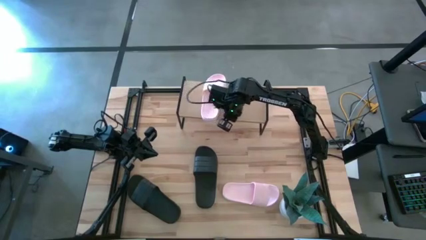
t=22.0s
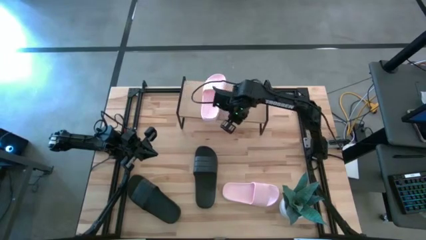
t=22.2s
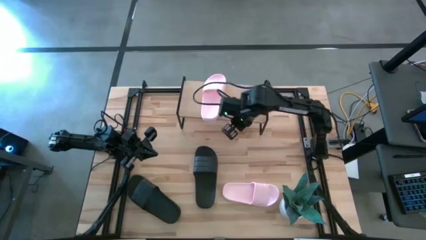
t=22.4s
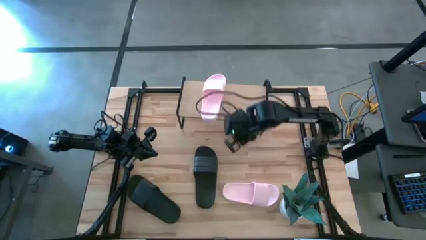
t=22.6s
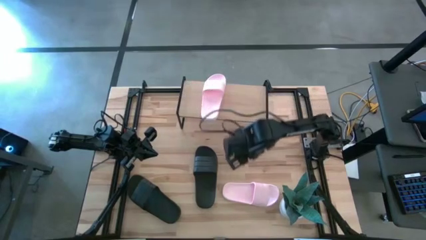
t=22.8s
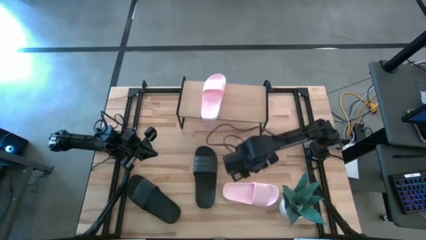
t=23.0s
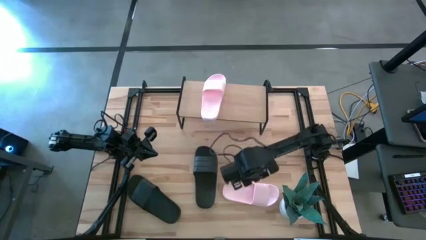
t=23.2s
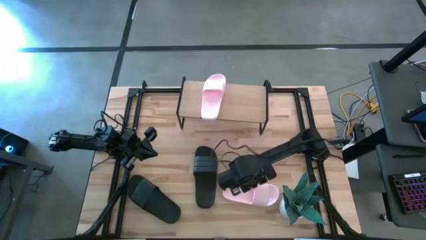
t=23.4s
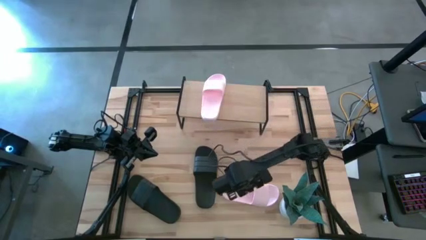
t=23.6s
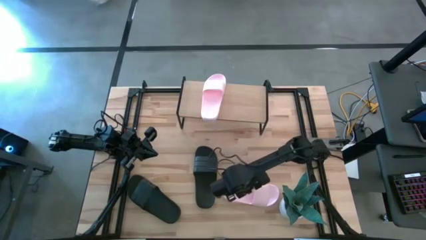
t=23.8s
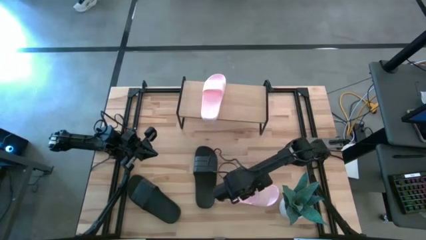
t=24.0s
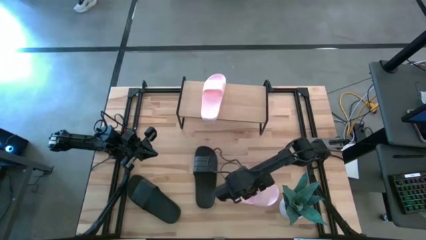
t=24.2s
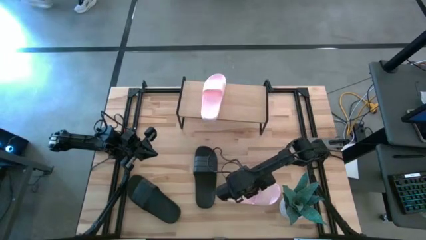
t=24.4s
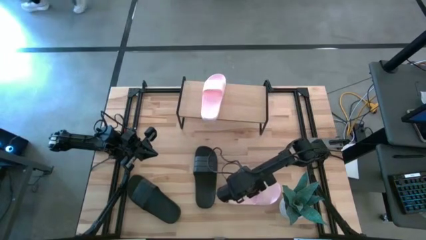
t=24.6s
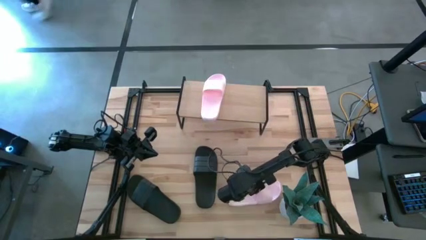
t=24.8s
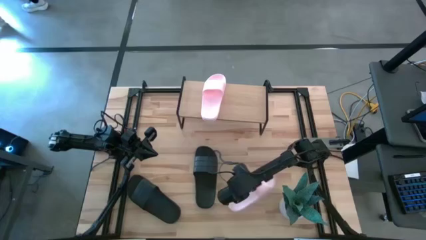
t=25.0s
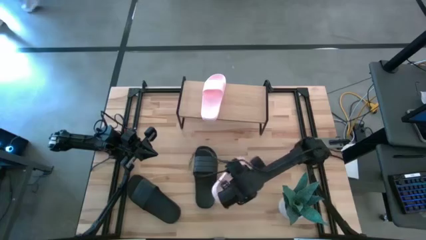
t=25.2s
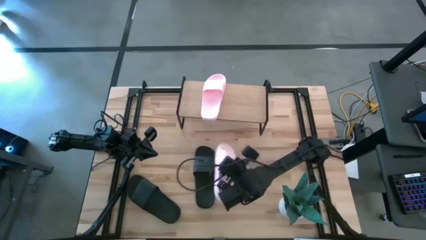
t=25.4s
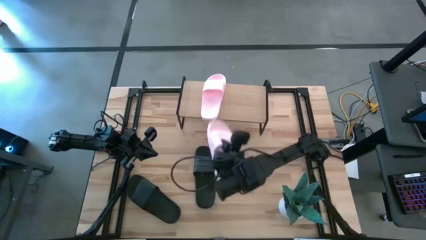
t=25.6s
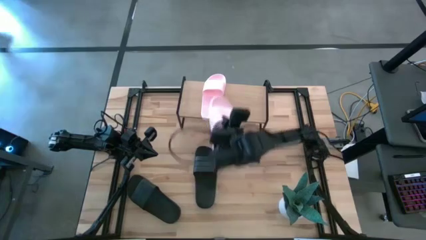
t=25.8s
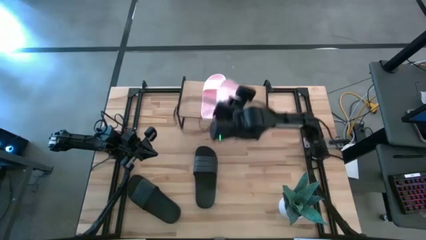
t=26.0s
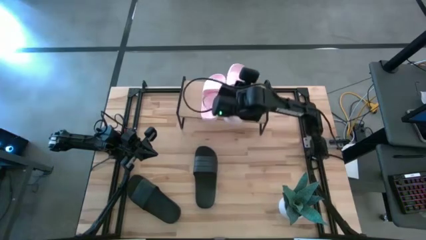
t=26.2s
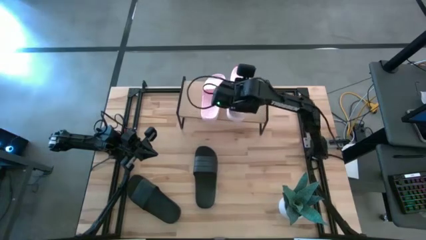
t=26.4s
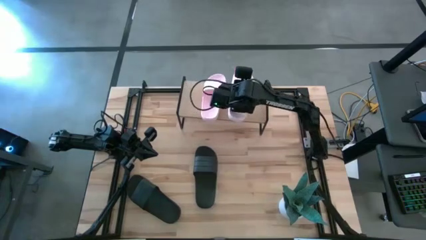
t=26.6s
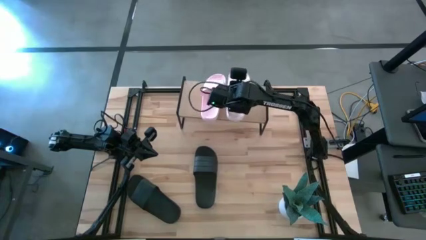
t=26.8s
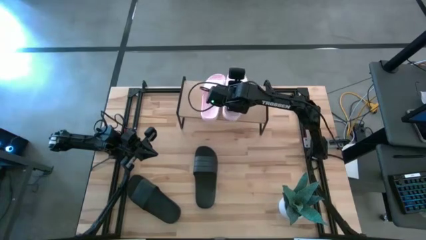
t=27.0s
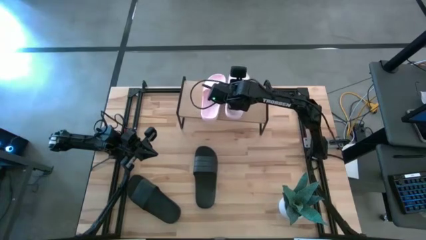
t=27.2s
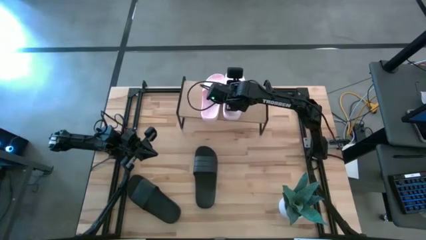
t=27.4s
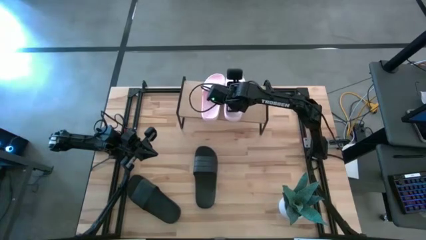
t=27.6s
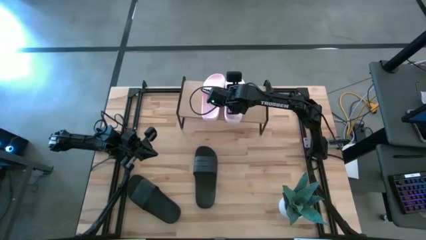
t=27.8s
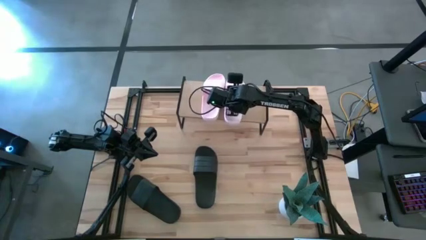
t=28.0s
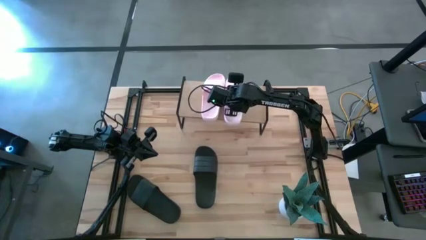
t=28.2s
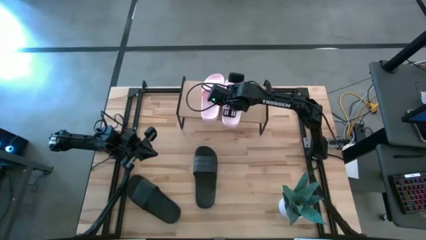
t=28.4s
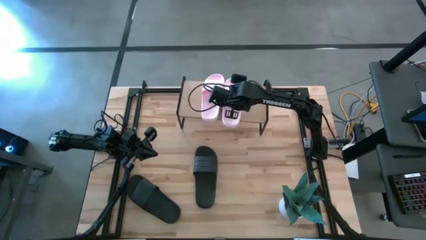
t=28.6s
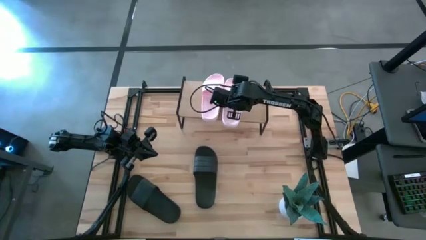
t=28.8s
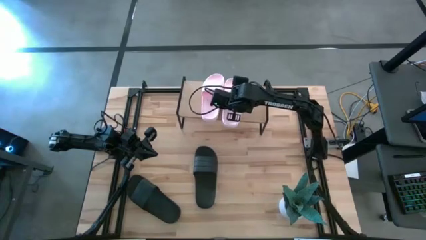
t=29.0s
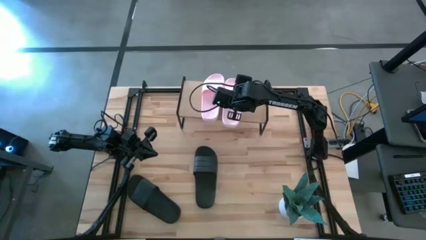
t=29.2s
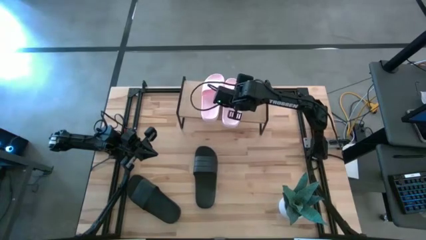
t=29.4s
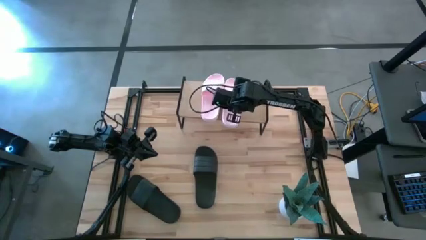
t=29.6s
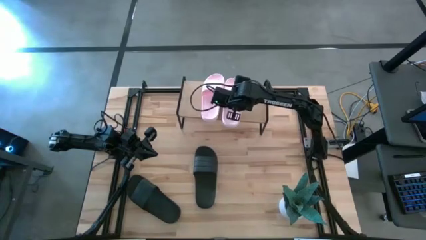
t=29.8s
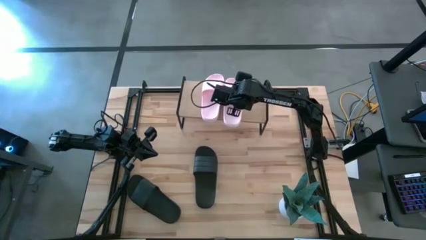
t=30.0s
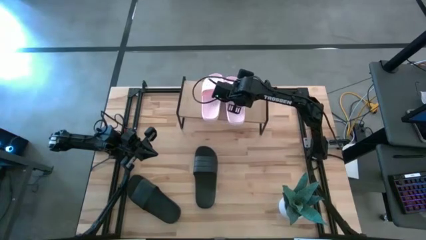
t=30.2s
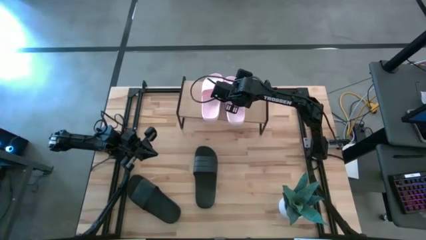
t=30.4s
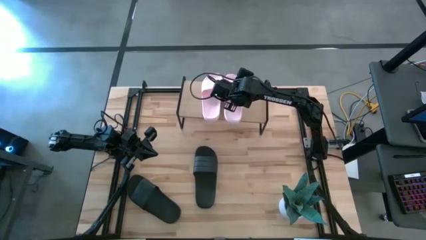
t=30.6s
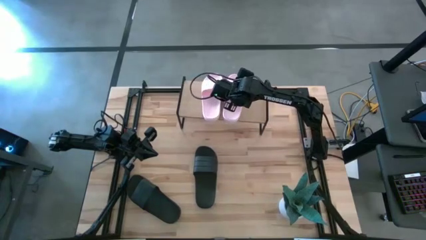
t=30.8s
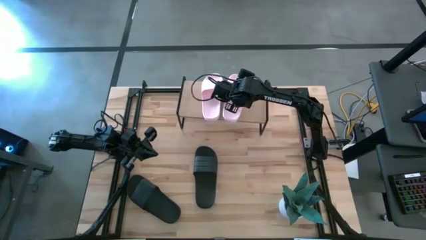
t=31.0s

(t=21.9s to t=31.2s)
Task: Pick and place slides into the shelf
Put the pink slide on the shelf

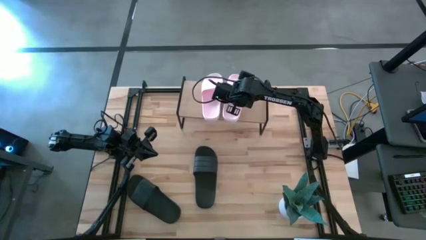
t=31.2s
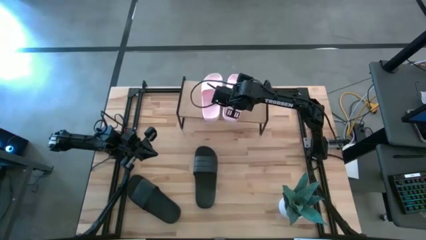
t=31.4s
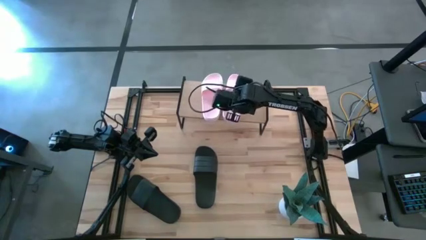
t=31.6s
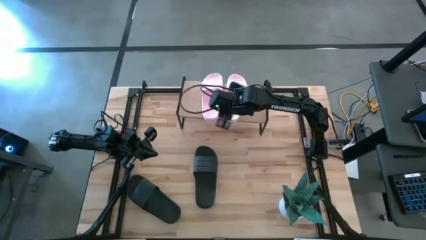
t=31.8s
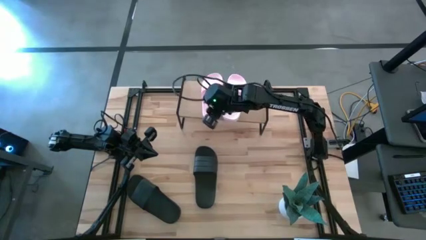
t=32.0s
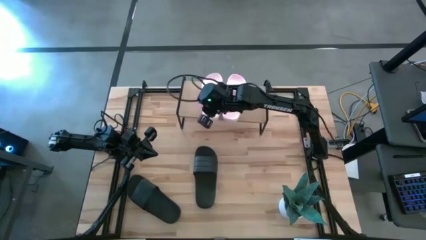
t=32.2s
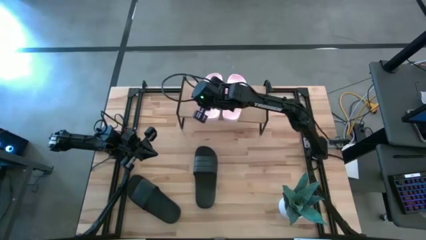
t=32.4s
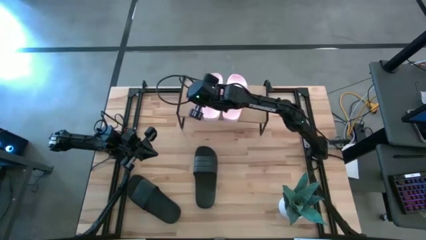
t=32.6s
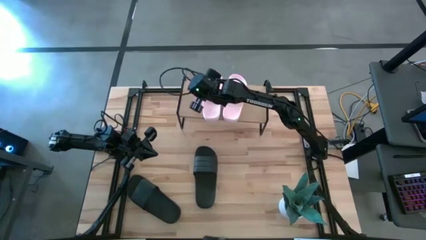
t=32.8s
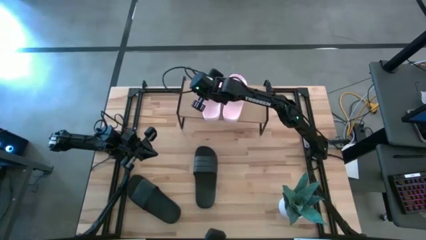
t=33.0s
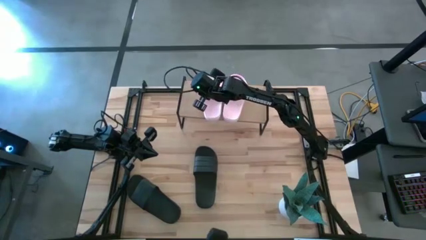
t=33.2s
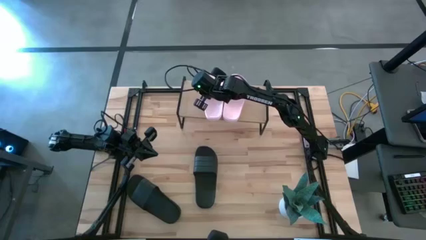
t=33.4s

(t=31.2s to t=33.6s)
Adjust the left pink slide on the shelf

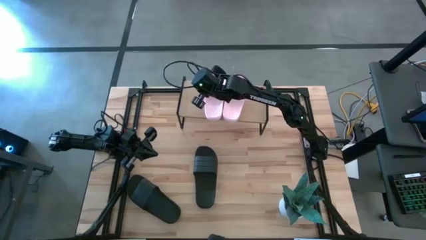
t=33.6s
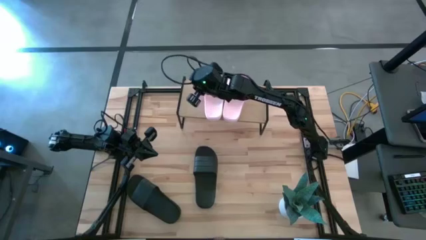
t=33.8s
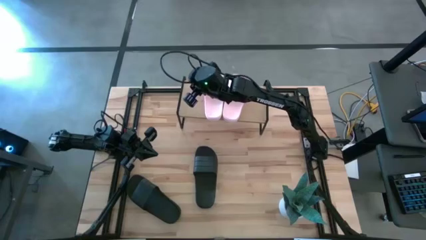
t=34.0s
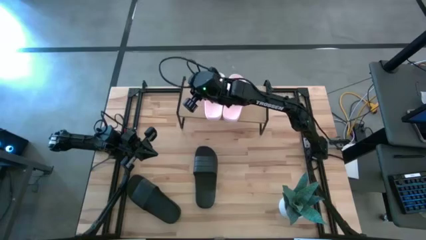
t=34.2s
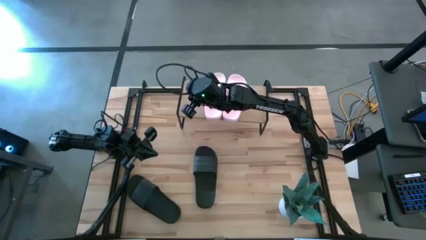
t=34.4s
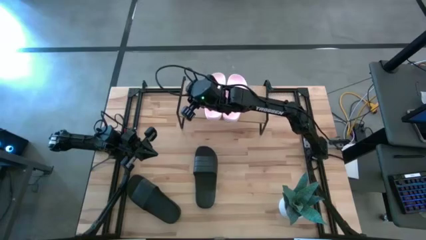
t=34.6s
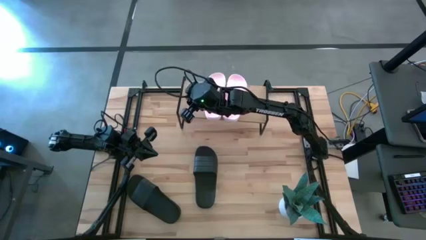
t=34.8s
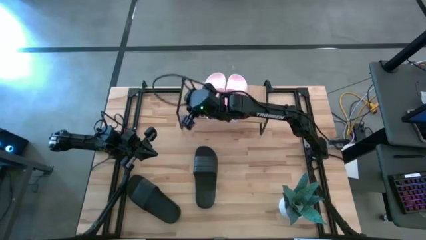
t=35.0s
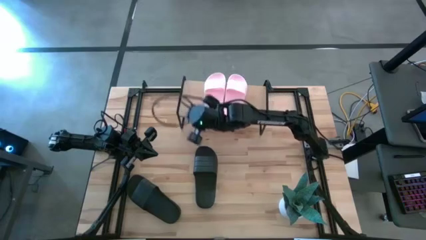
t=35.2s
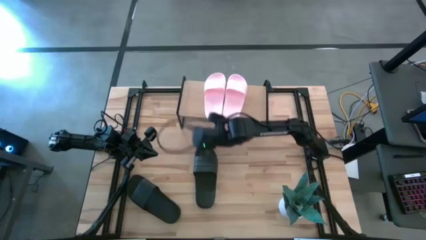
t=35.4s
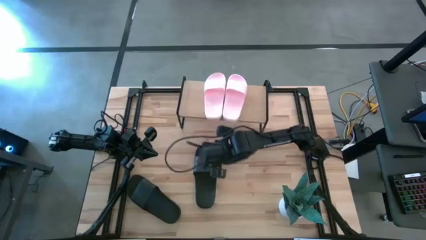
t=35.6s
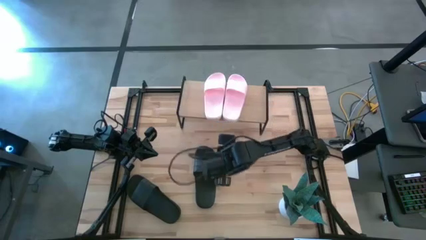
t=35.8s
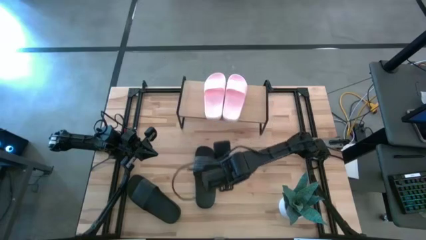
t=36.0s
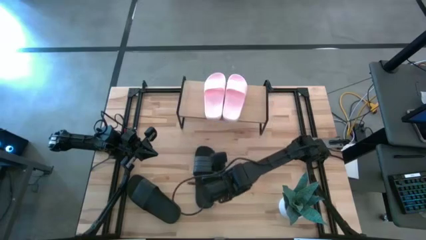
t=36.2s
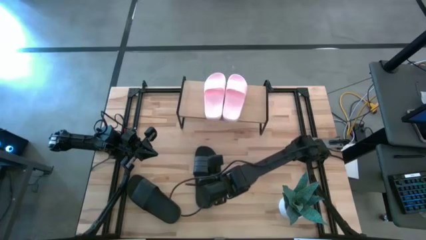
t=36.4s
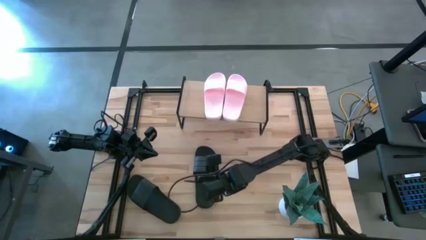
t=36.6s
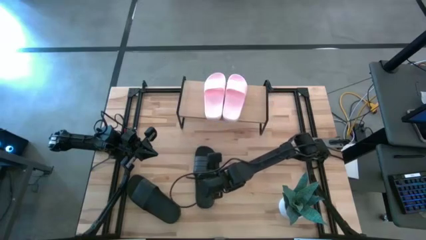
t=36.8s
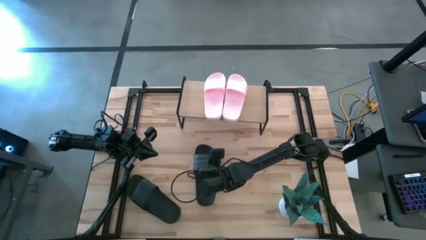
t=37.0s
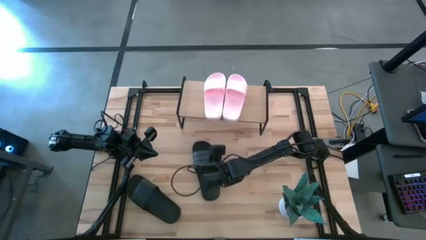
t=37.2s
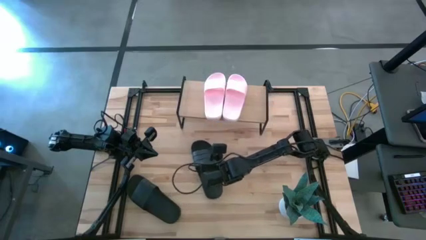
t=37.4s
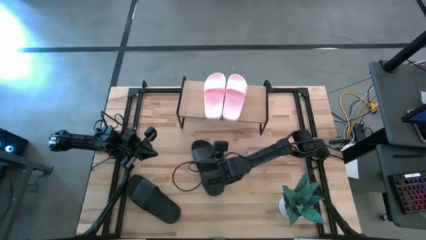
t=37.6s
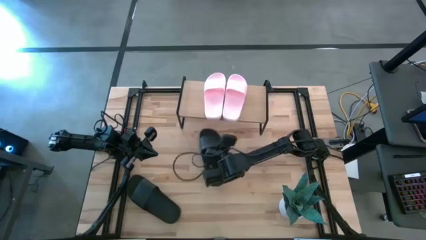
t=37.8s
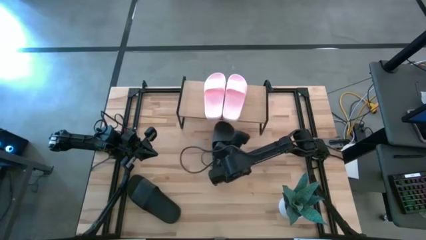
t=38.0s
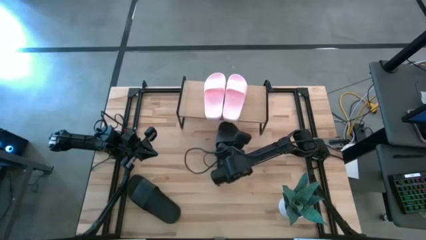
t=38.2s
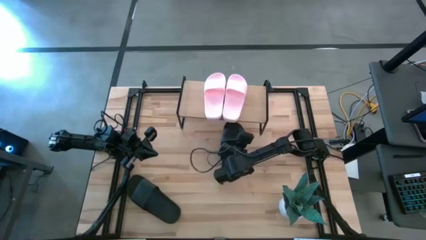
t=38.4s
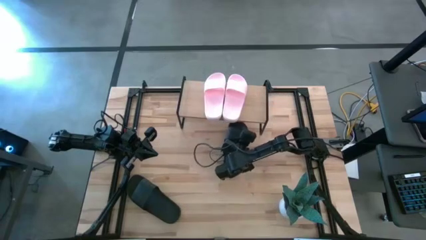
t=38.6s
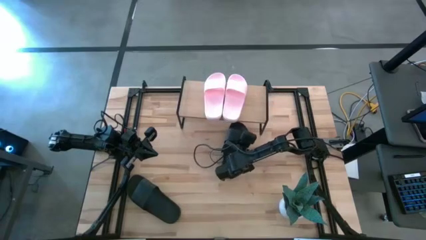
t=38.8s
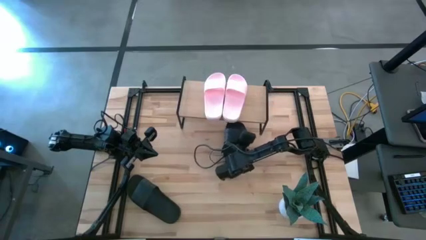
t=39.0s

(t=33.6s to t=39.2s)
Put the right black slide under the shelf
